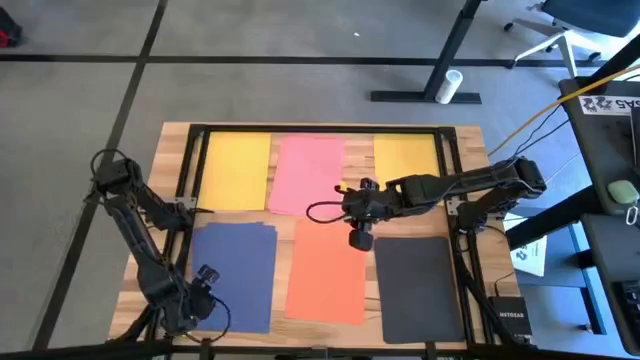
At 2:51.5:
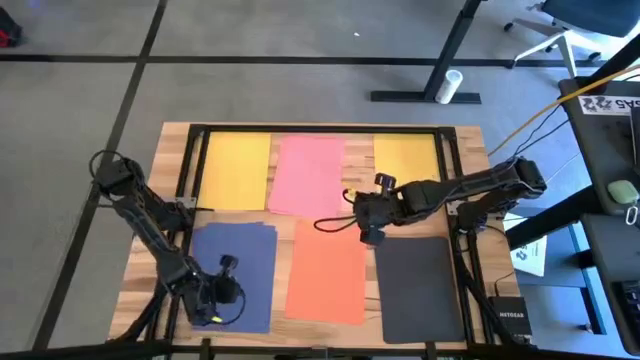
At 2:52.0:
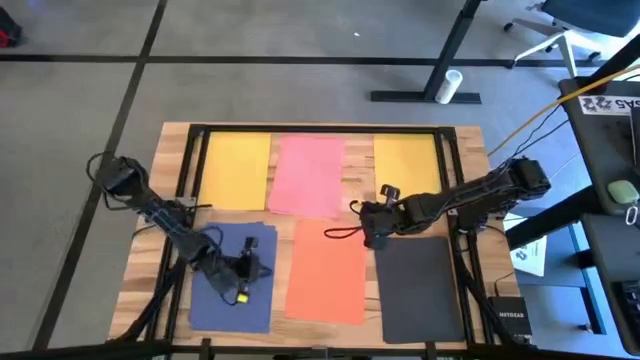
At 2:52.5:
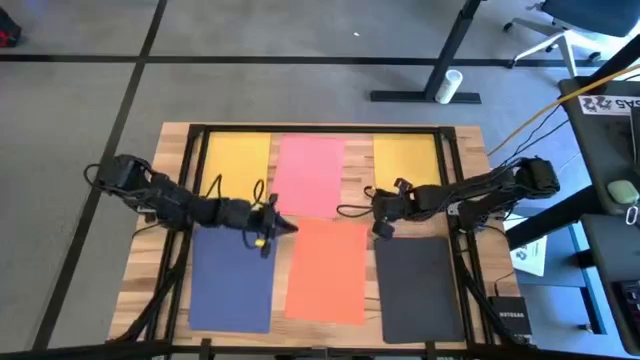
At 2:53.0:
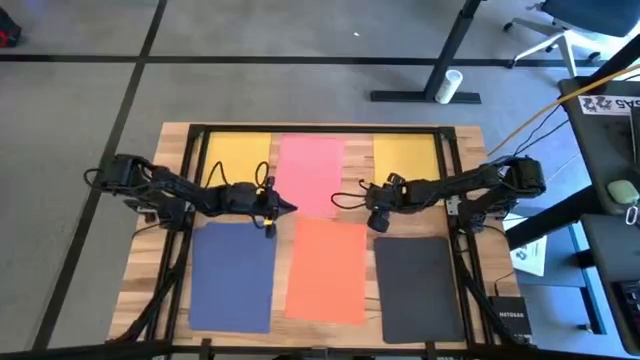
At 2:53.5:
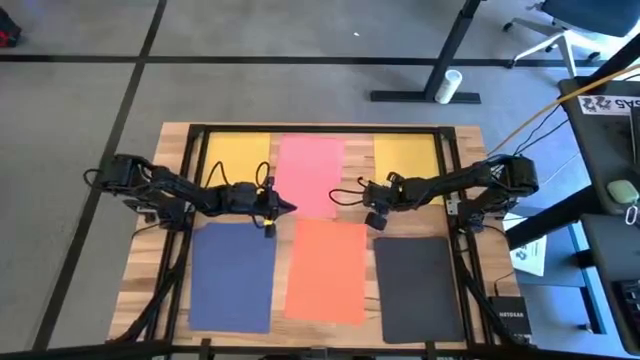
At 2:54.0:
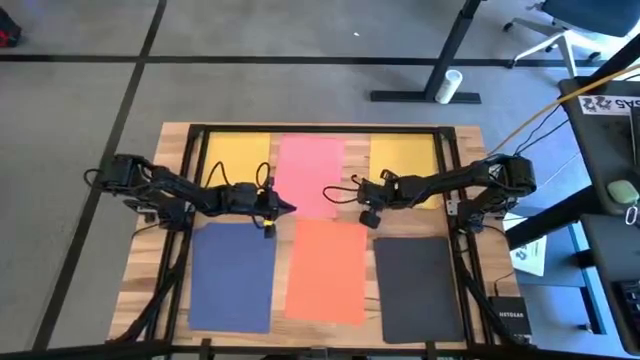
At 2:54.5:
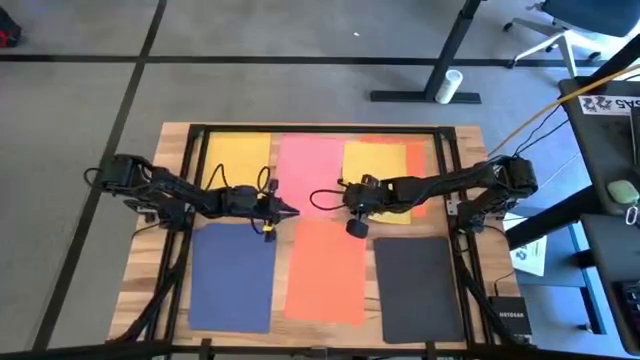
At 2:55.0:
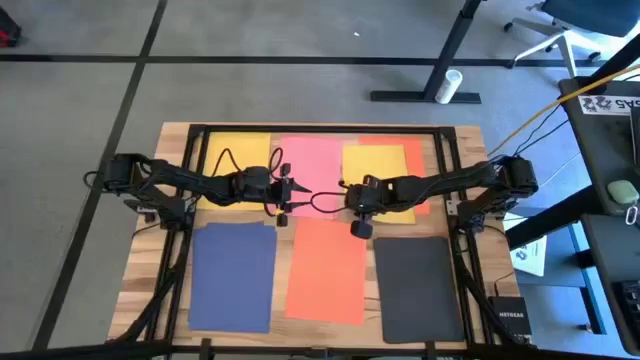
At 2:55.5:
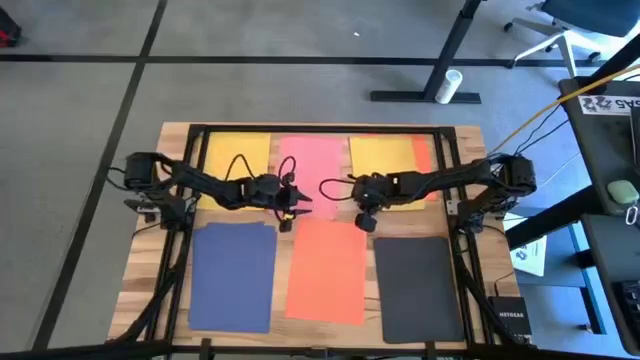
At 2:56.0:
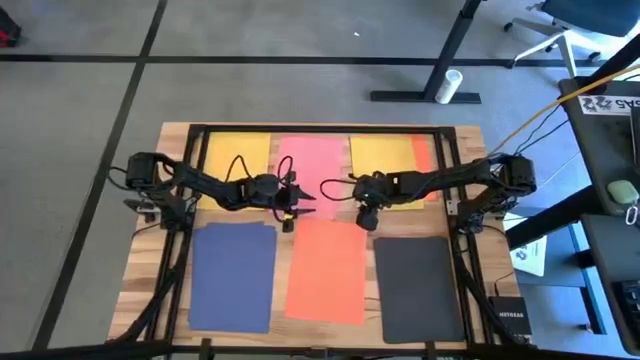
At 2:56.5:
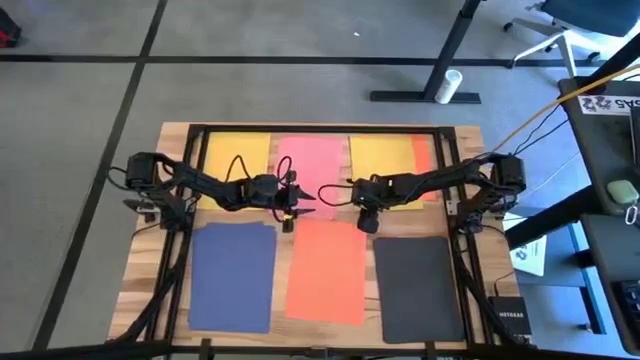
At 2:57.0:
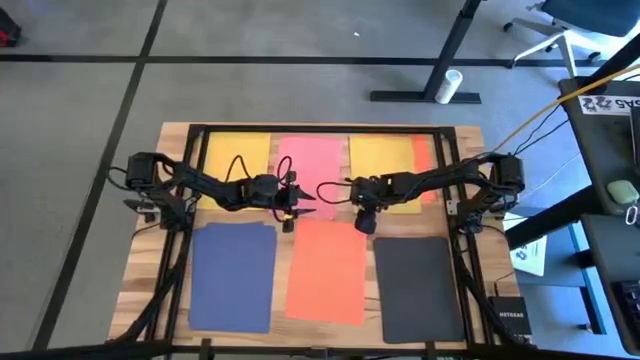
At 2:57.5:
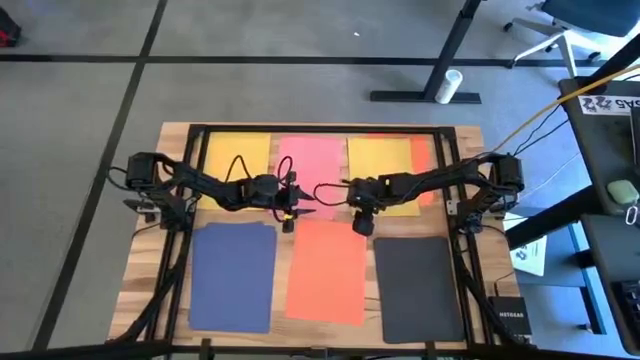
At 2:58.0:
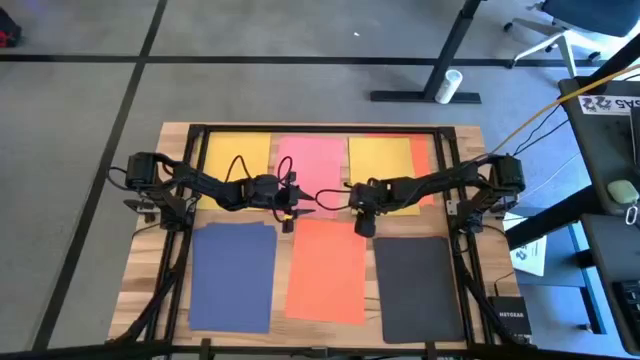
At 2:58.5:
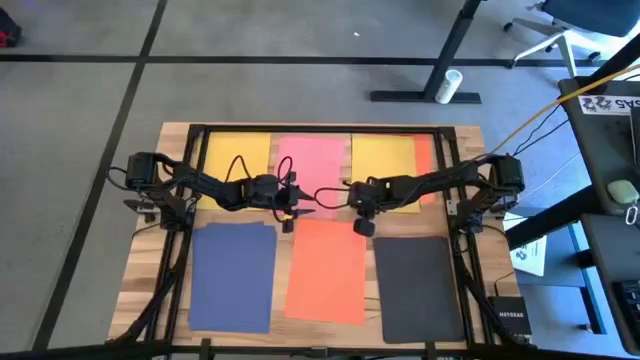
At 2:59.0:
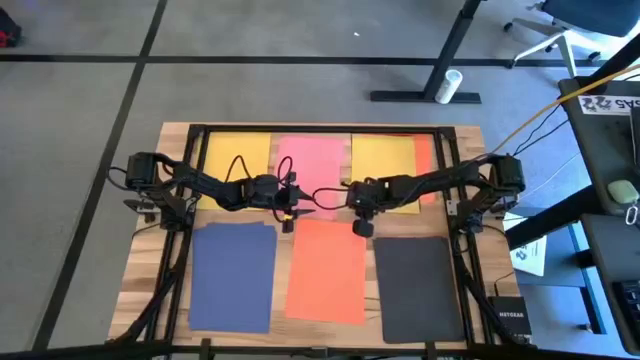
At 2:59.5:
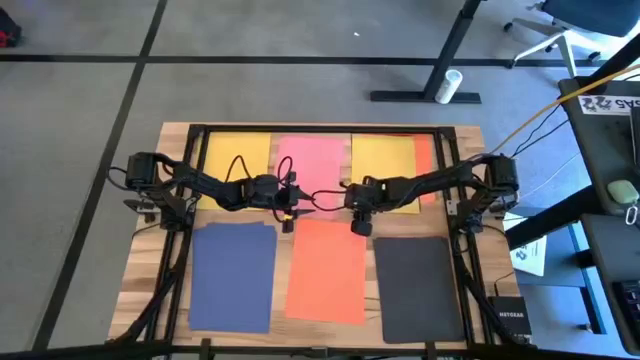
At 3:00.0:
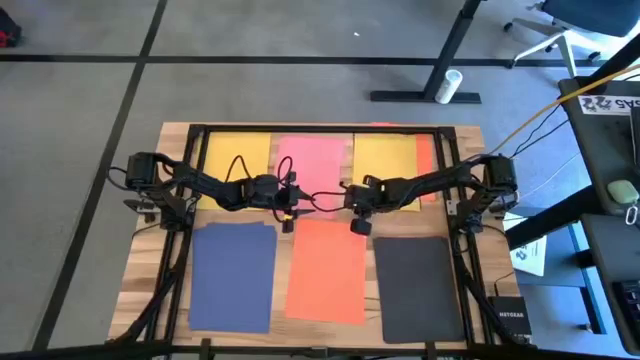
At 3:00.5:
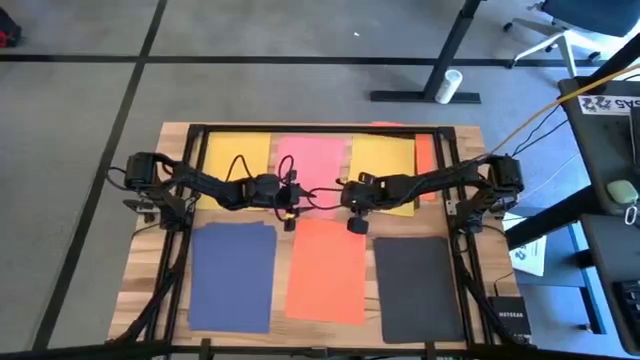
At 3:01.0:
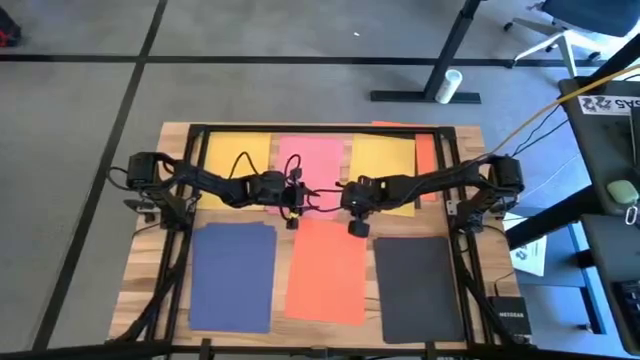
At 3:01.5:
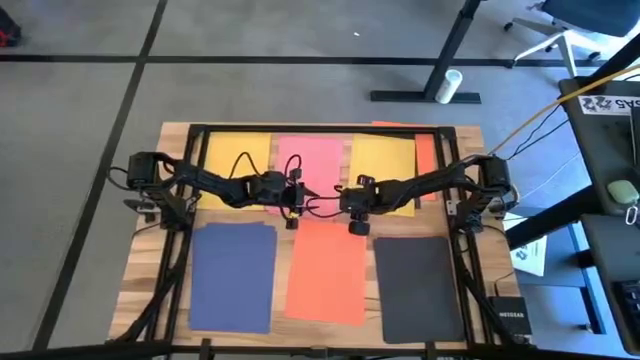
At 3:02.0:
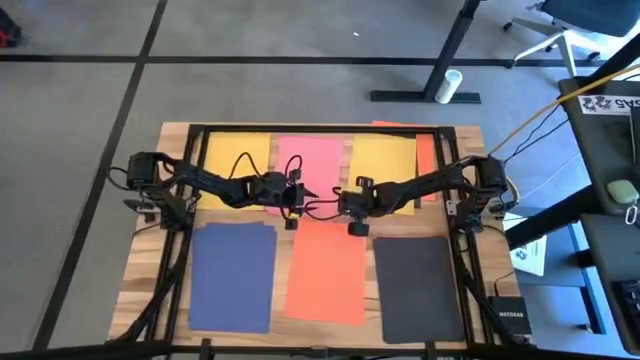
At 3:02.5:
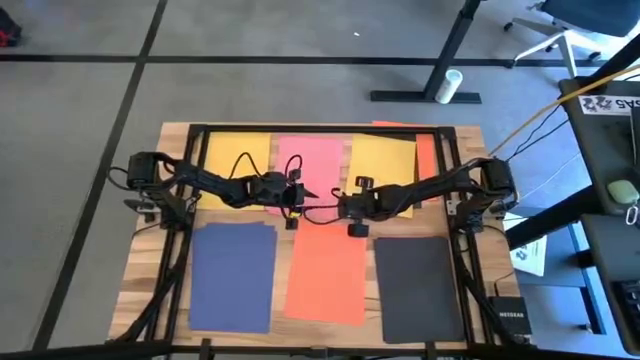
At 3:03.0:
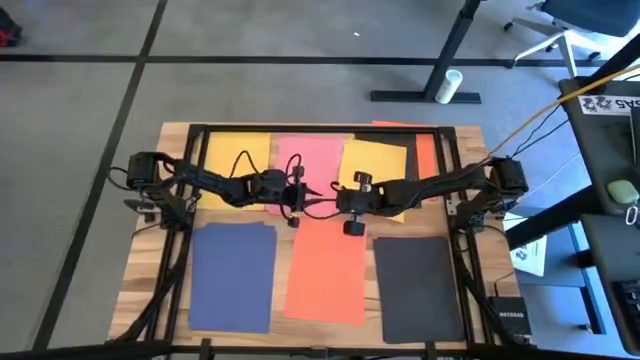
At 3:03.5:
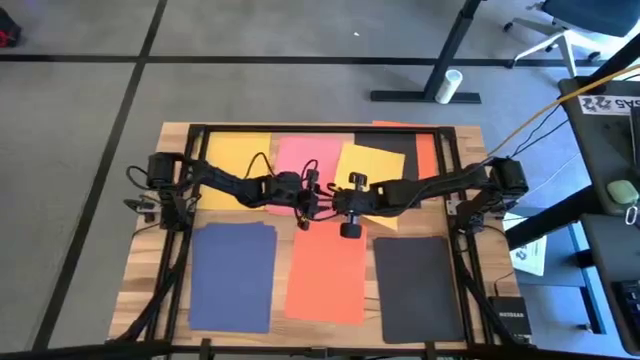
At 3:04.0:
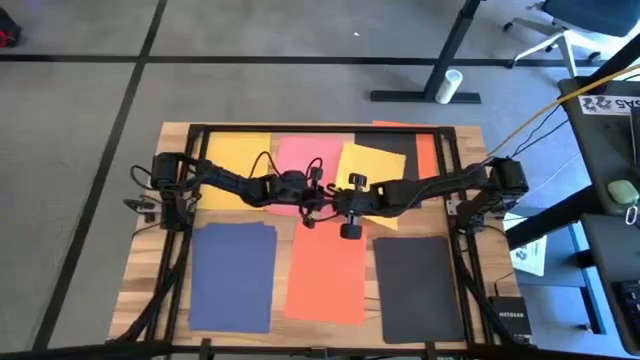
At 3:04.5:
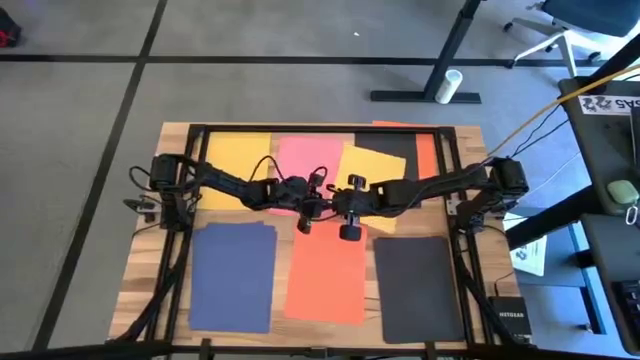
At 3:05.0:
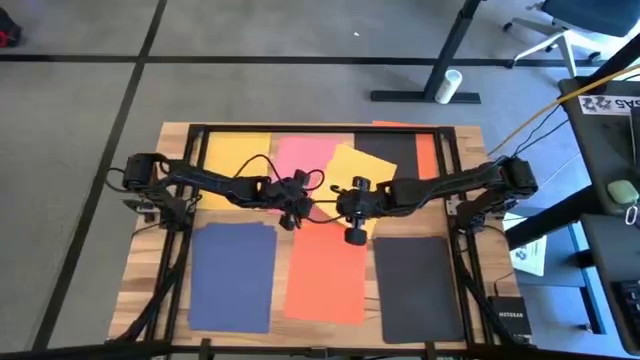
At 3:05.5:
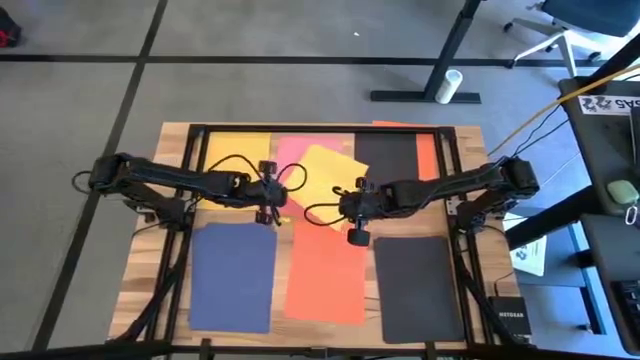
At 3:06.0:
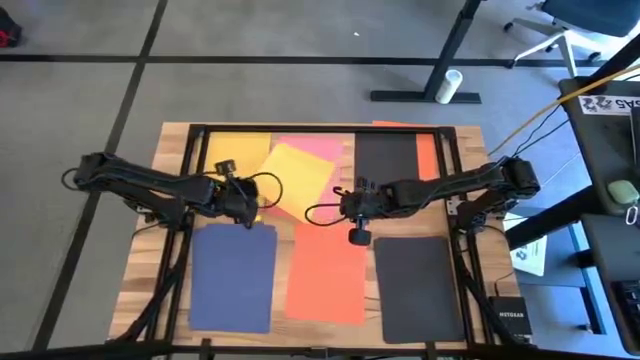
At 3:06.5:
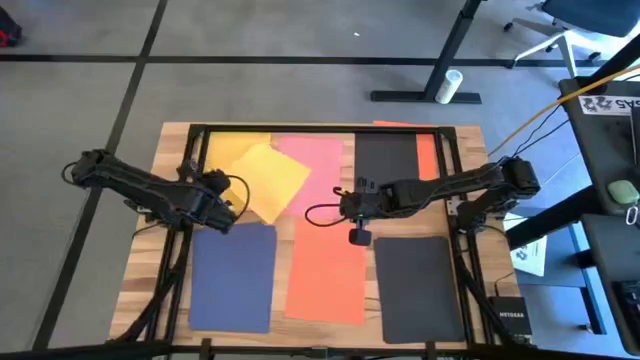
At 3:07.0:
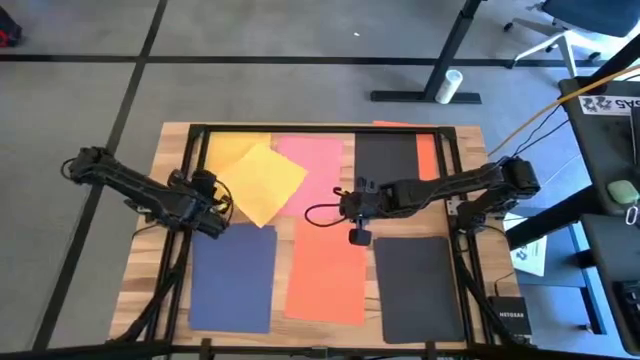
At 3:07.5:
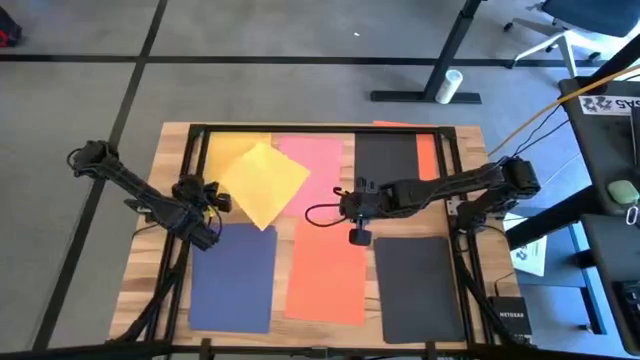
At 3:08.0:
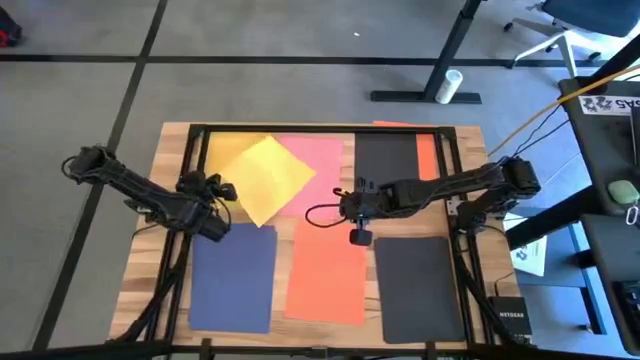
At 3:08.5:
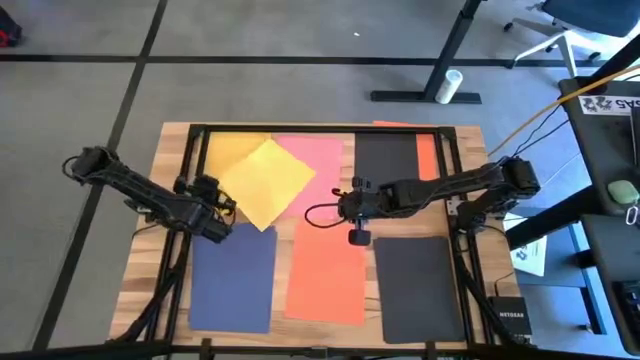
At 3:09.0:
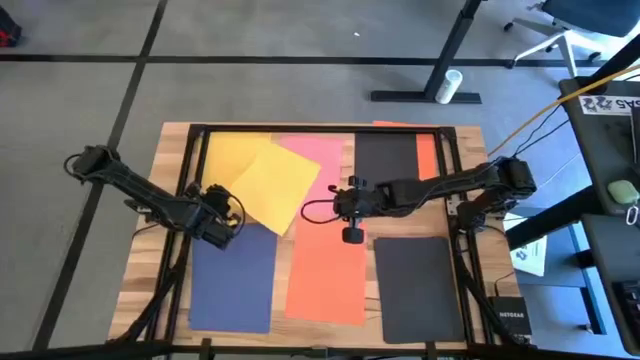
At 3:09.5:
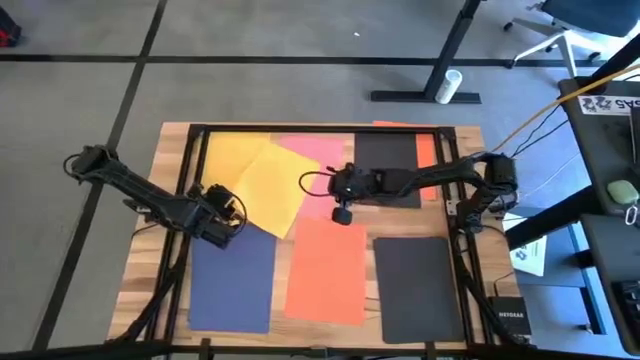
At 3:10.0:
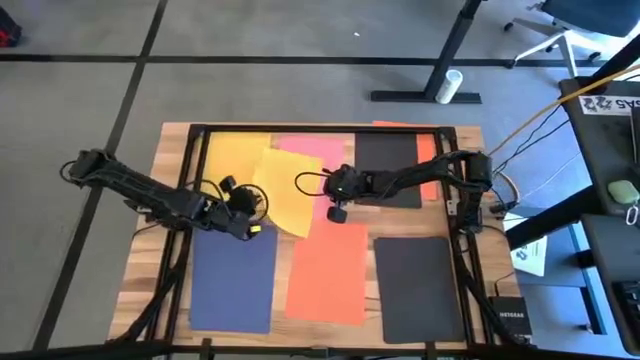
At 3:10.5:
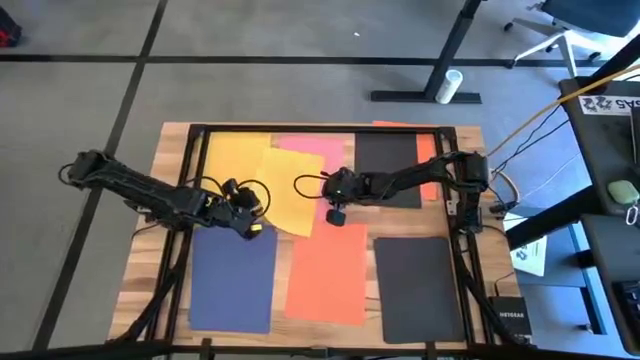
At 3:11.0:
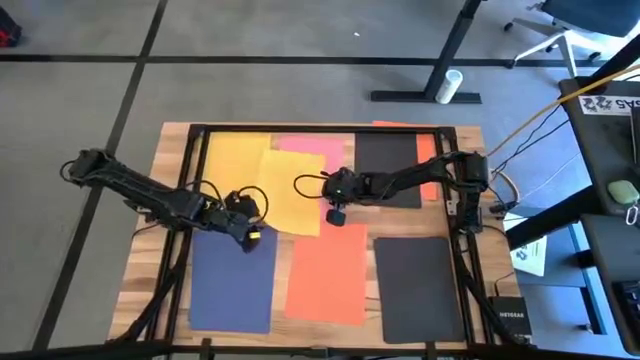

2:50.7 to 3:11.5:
Task: Organize paper
Stack the yellow paper on top of the stacked yellow papers
